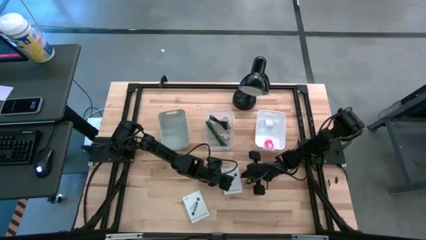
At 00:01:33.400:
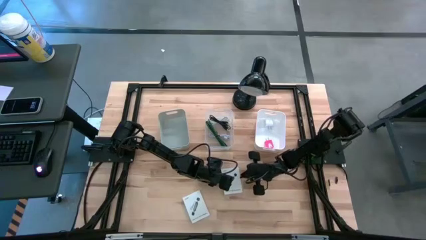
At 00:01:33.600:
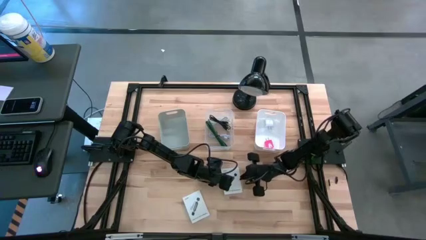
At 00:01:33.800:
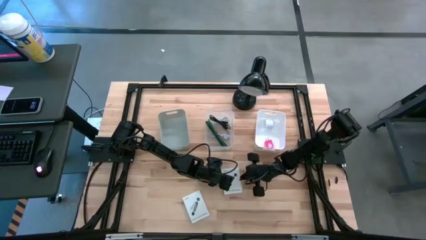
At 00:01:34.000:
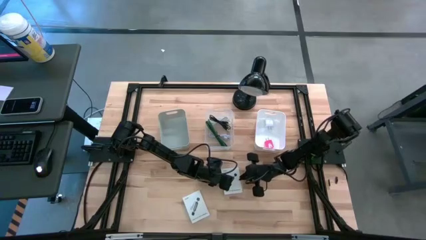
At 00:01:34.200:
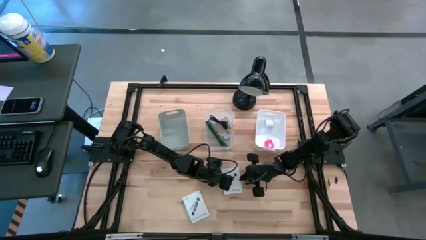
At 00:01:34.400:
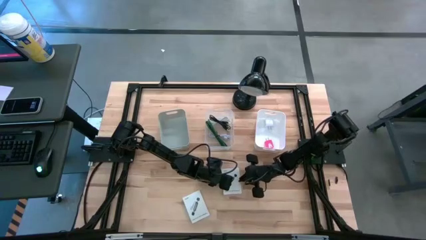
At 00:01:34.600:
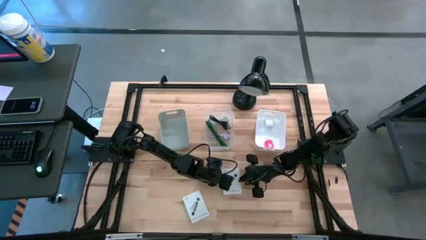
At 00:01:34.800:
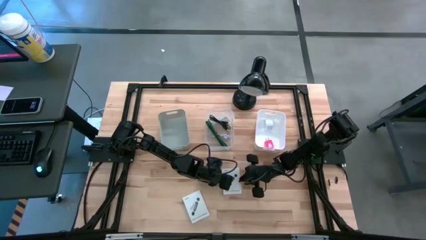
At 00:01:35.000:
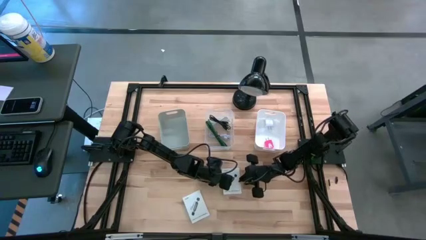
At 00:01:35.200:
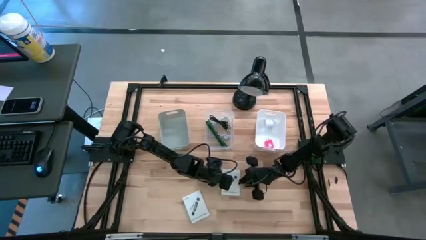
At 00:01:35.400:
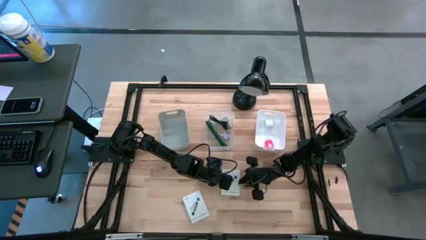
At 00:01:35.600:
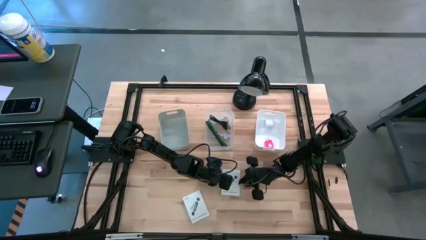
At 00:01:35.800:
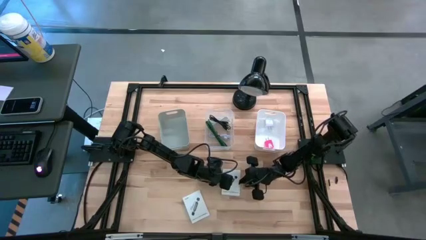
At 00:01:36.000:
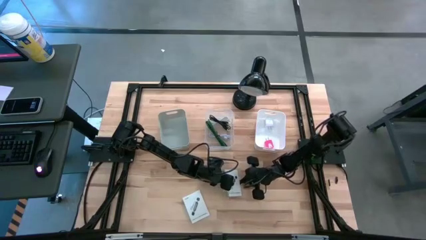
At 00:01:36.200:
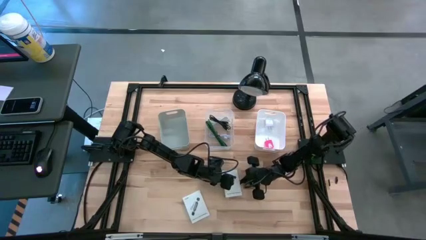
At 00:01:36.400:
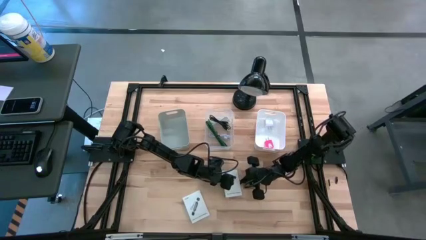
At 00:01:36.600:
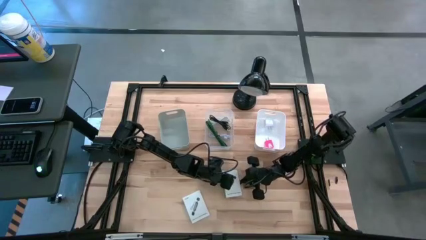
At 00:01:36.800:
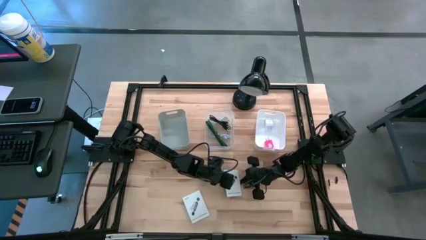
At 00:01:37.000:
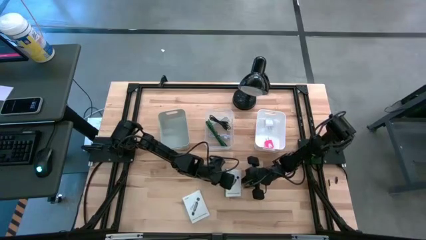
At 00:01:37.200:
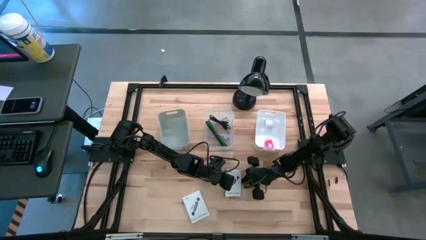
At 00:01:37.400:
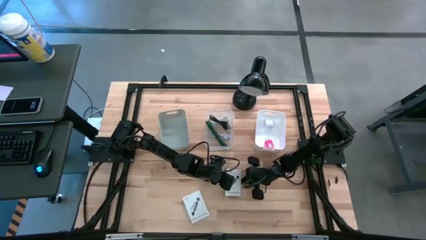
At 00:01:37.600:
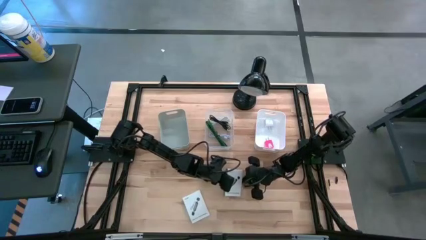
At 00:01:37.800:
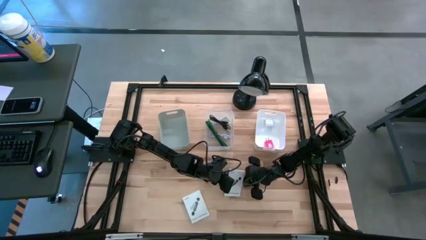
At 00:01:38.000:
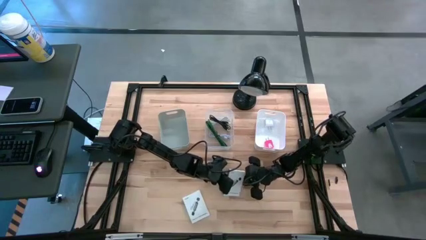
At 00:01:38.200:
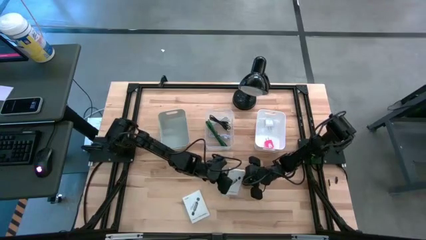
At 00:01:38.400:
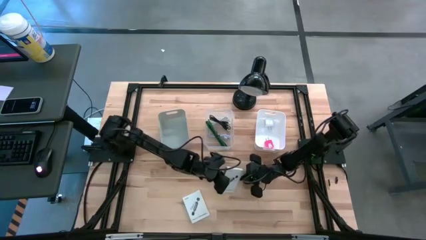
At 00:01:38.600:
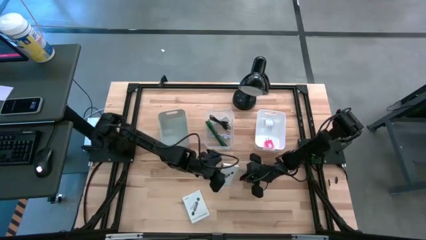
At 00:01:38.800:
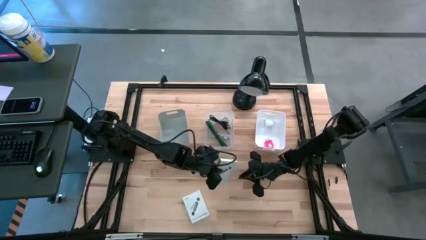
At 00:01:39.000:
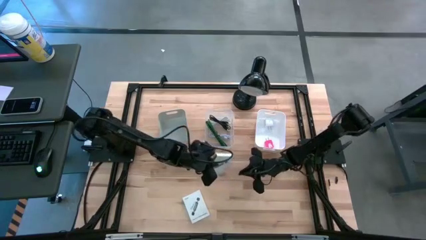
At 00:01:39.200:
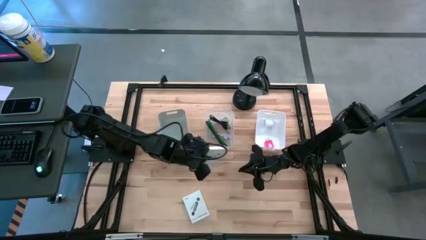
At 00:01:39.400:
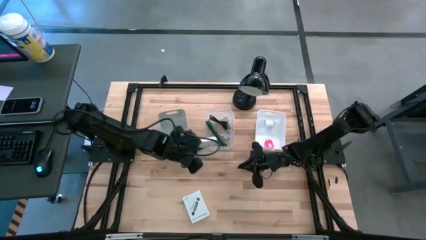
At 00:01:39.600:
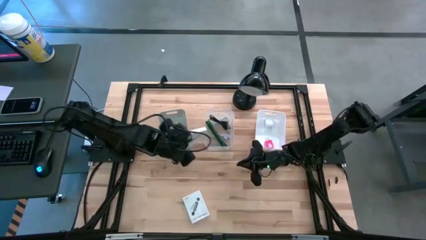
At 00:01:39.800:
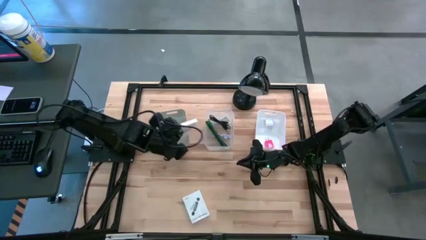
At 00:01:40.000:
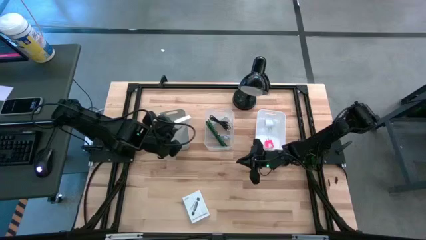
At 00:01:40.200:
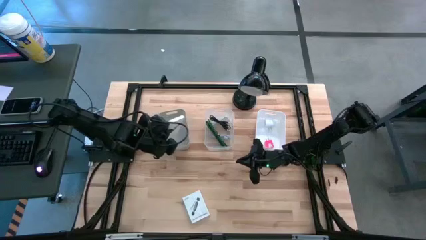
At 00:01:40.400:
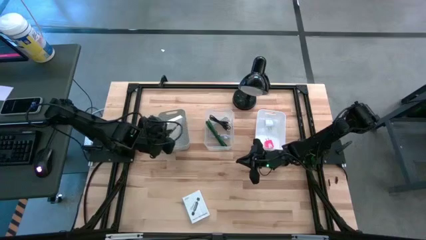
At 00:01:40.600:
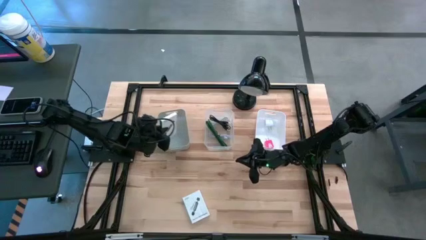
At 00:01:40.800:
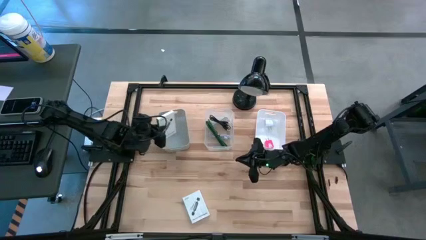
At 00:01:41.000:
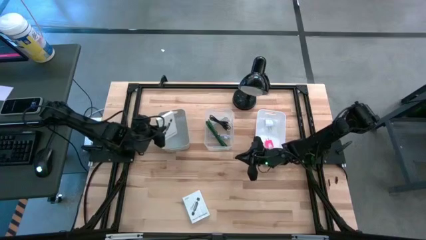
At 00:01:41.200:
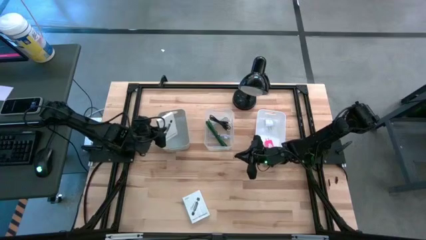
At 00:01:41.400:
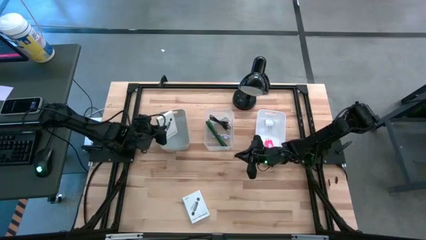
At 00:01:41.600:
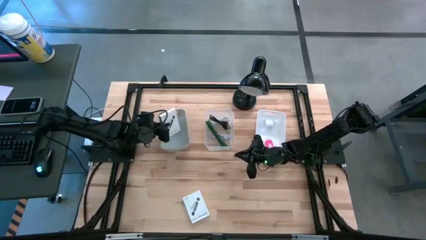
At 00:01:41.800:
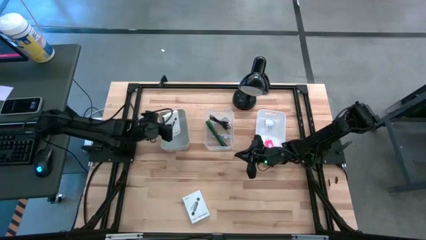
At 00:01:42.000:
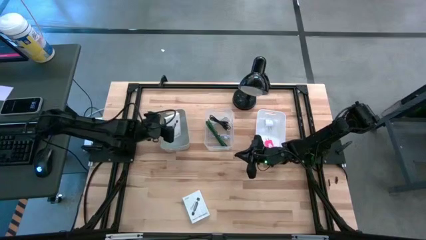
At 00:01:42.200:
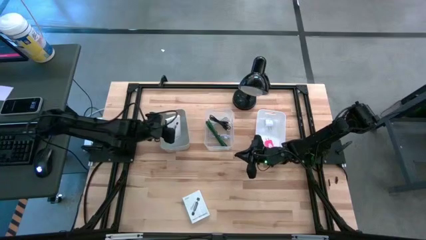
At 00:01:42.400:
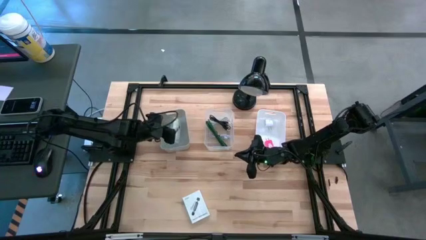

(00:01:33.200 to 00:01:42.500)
Task: Pick and place items into bin
Put the top white card reader box into the gray bin

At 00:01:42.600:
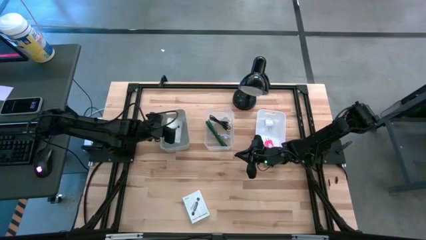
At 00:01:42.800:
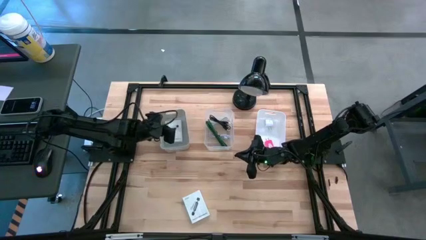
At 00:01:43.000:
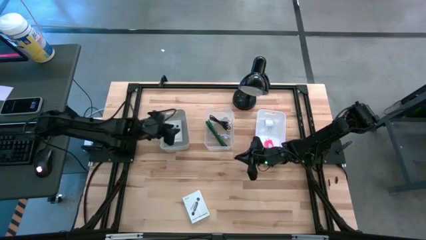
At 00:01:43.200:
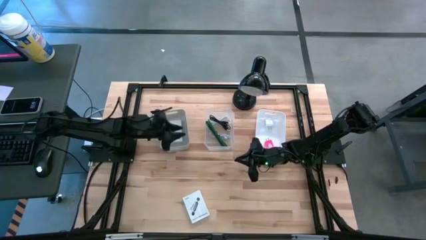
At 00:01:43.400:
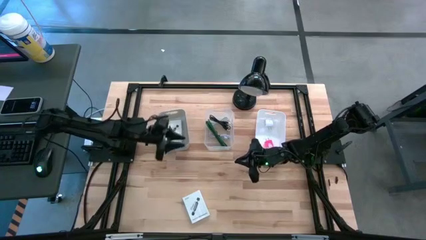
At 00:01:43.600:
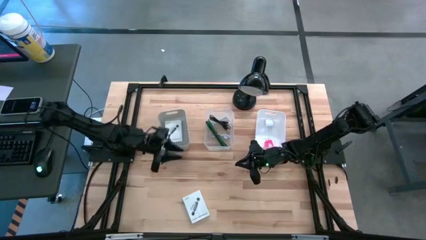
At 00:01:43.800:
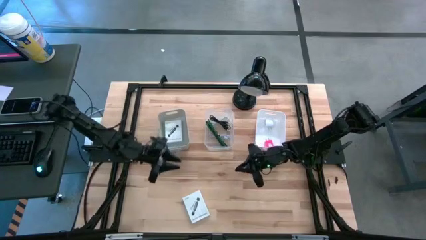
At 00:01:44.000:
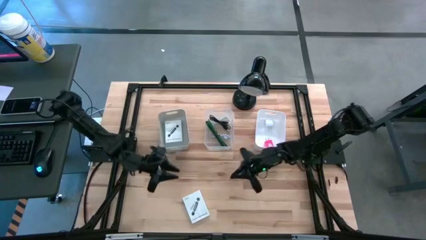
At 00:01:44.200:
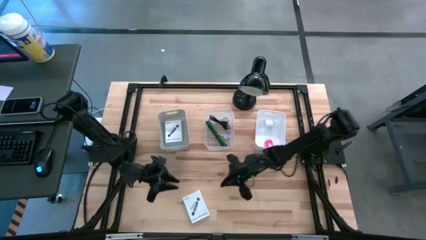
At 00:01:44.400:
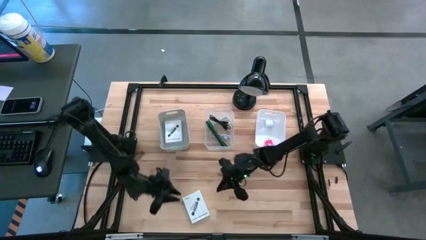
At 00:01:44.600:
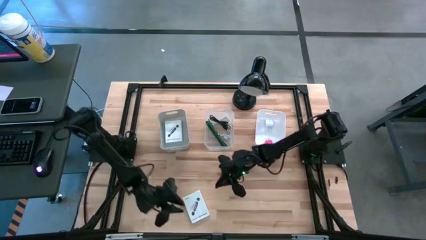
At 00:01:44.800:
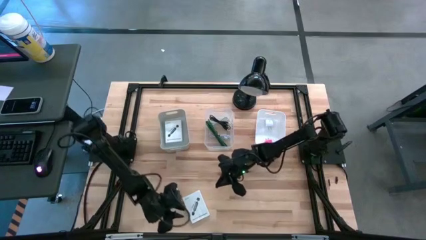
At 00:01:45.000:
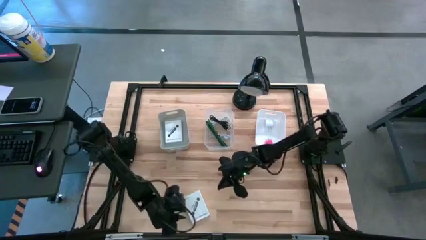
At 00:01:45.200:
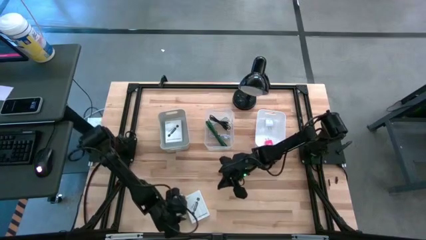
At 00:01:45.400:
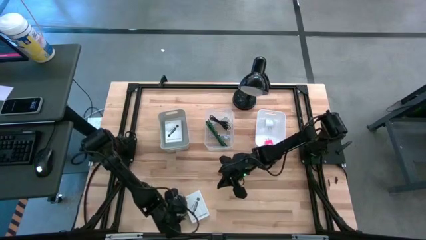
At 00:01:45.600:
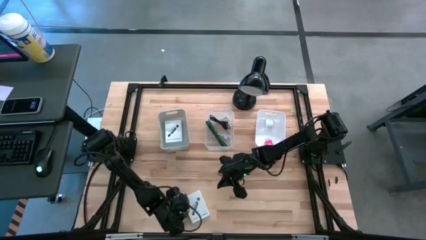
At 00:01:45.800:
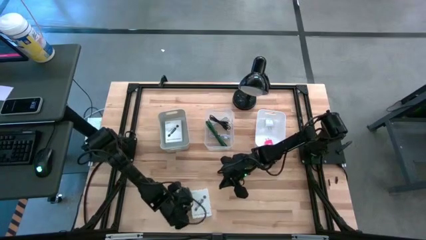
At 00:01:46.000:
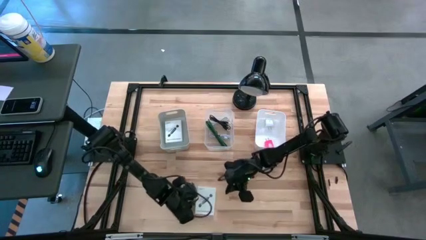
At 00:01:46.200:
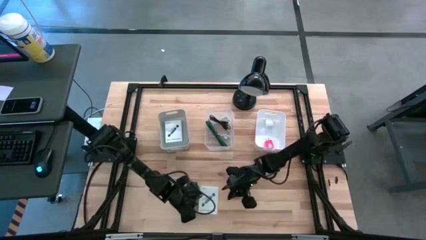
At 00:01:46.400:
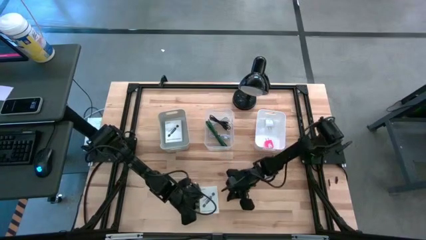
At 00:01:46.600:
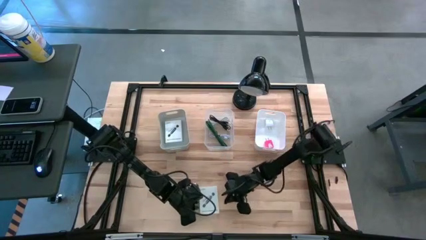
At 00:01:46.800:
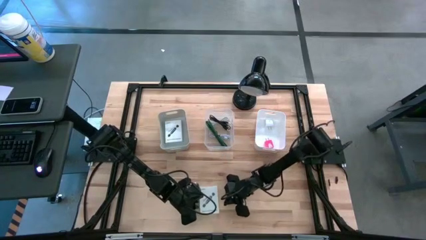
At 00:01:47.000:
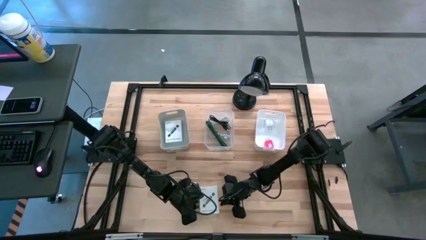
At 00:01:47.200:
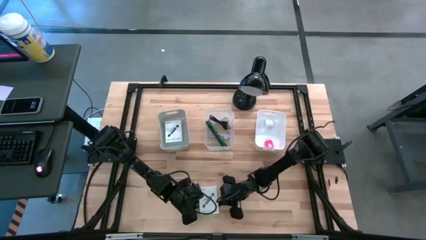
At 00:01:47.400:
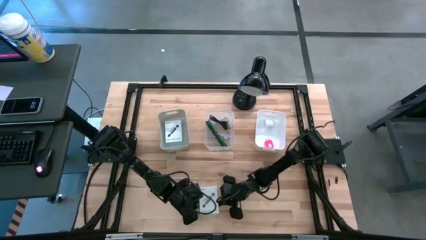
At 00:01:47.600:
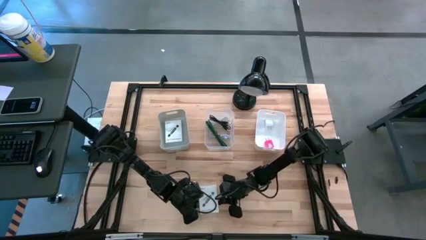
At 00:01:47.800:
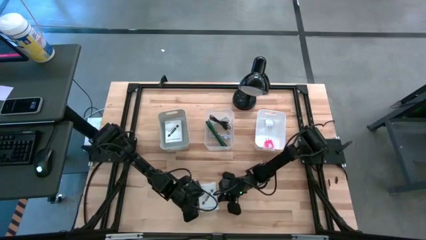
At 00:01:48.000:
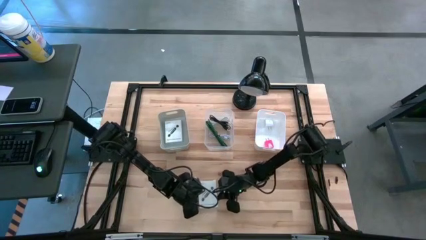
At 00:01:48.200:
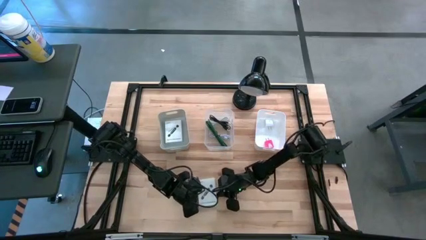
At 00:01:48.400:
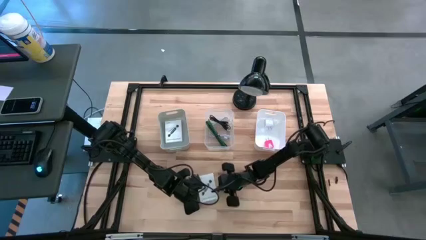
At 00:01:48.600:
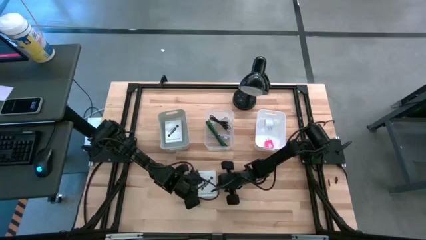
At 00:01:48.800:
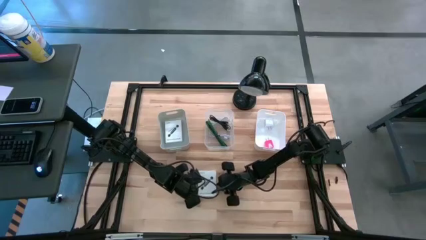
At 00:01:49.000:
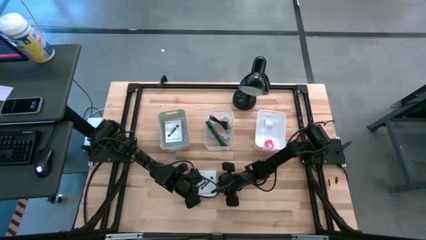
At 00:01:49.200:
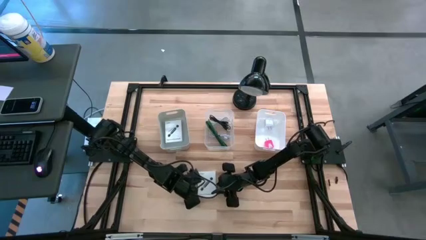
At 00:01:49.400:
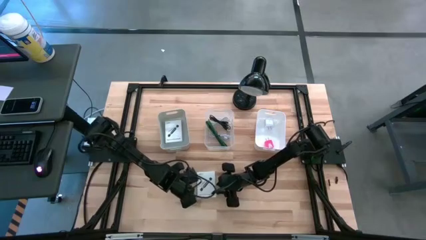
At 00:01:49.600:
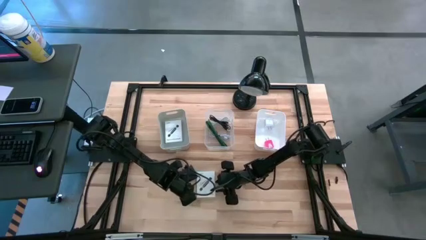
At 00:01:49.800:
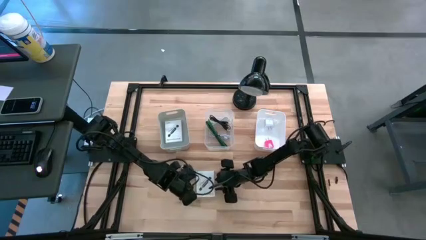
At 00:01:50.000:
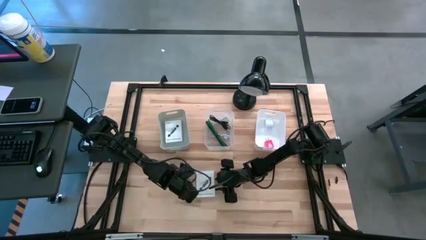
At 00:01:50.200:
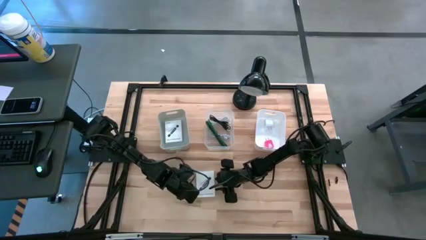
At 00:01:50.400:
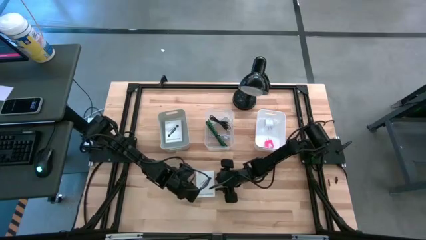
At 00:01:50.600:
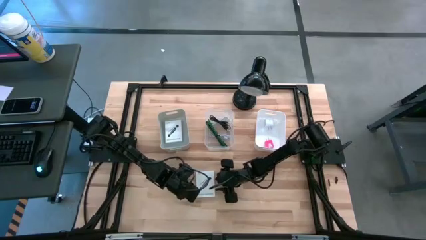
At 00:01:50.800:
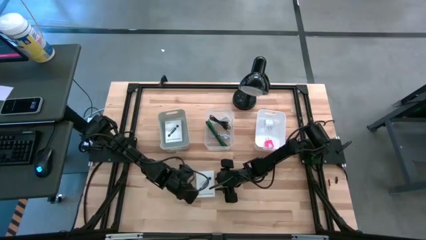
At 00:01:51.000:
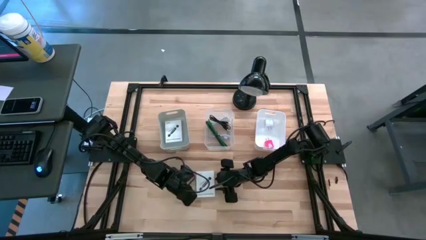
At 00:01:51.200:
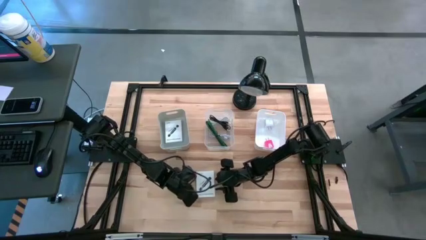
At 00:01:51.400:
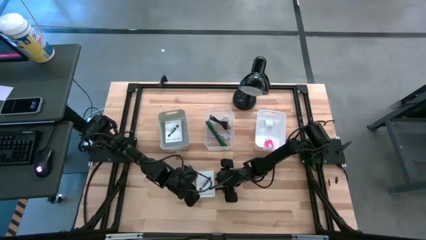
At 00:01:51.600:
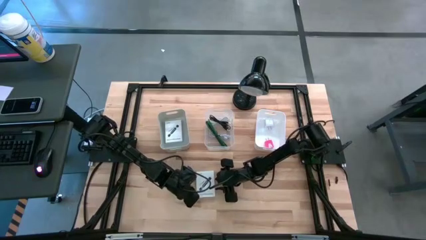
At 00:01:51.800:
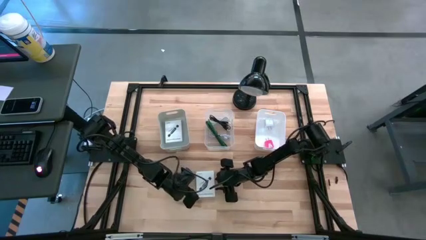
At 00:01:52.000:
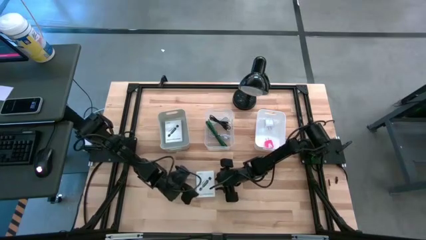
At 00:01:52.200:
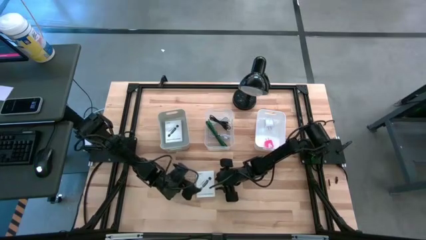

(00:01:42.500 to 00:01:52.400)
Put the white card reader box into the gray bin
